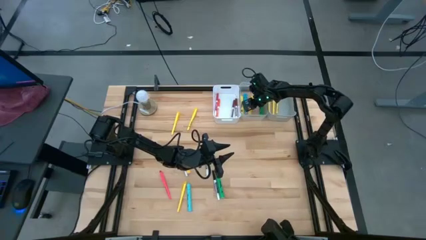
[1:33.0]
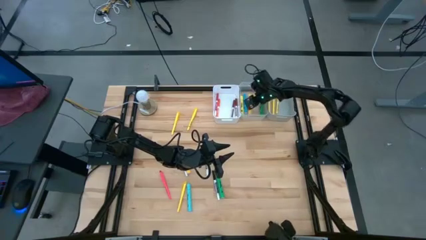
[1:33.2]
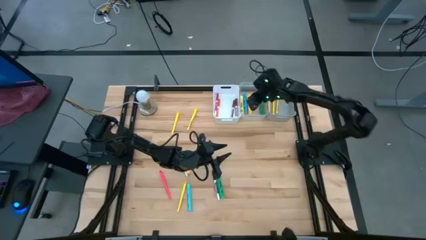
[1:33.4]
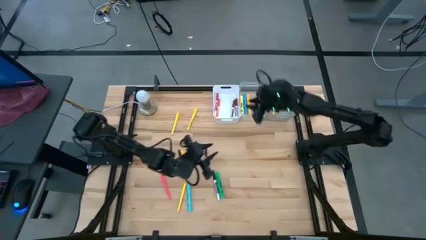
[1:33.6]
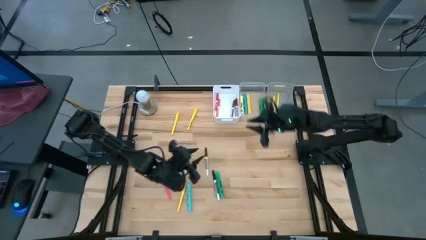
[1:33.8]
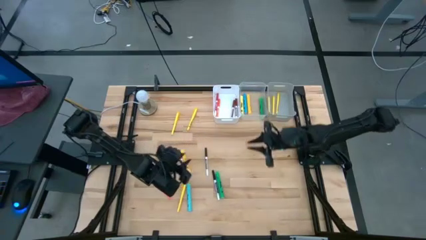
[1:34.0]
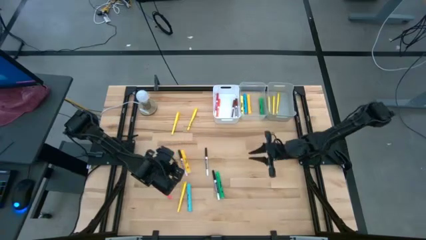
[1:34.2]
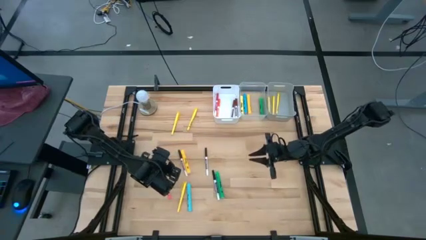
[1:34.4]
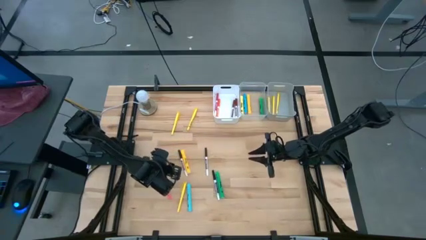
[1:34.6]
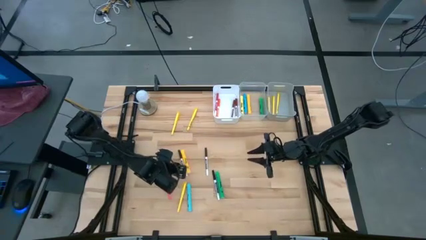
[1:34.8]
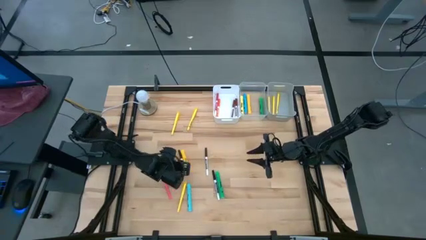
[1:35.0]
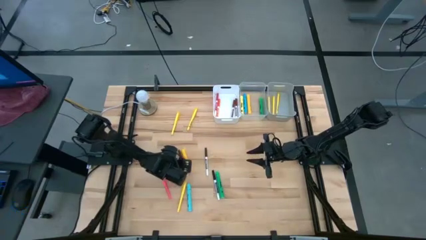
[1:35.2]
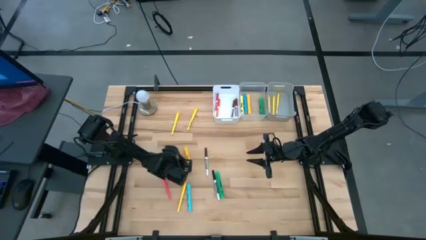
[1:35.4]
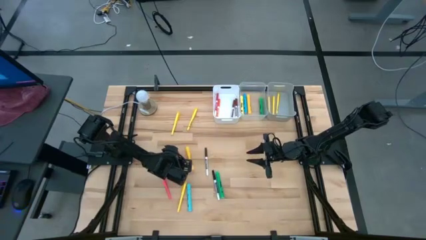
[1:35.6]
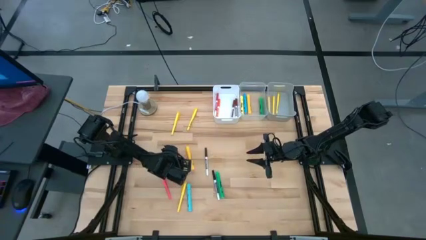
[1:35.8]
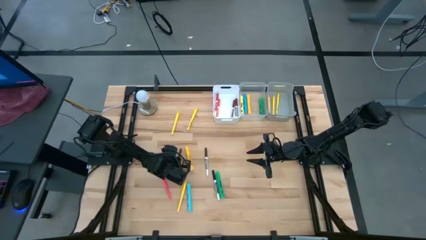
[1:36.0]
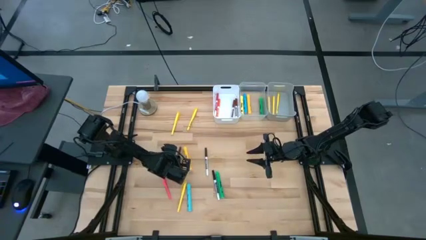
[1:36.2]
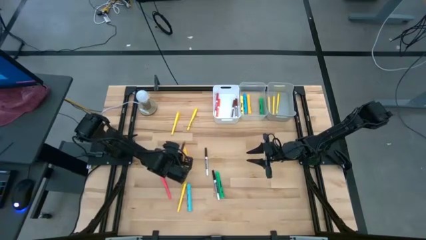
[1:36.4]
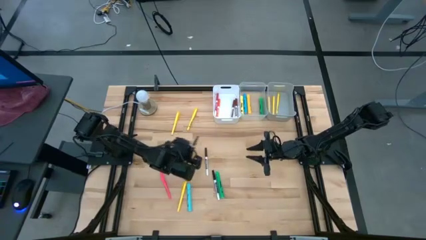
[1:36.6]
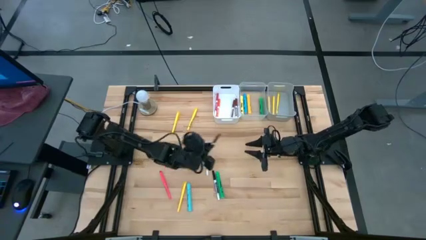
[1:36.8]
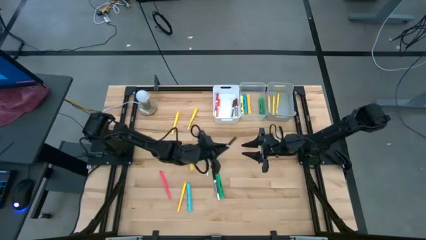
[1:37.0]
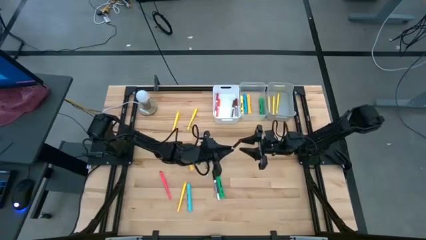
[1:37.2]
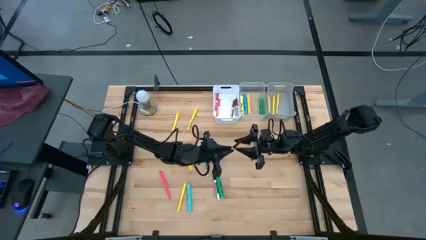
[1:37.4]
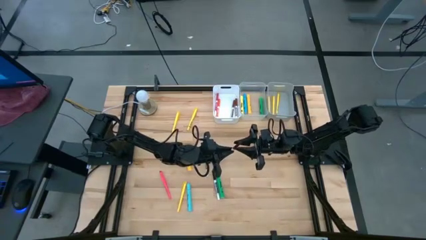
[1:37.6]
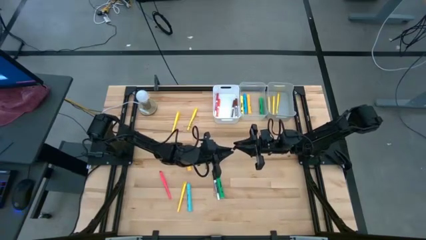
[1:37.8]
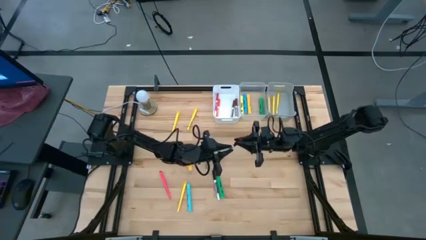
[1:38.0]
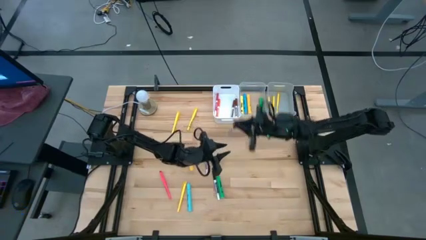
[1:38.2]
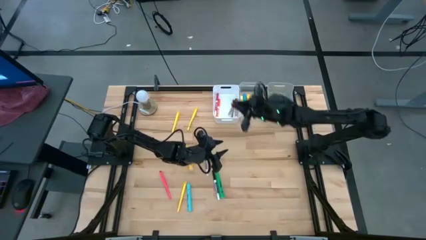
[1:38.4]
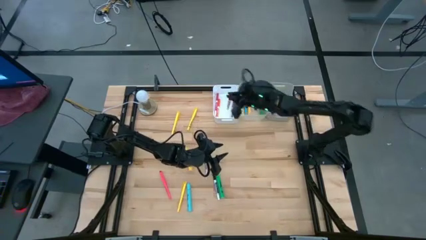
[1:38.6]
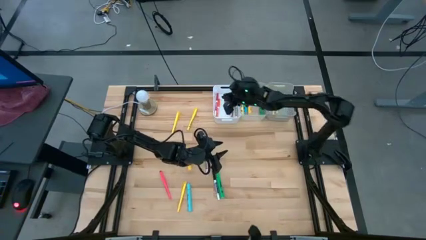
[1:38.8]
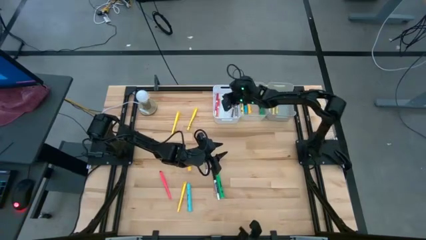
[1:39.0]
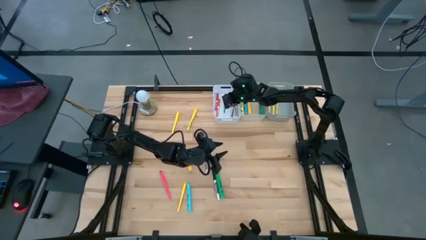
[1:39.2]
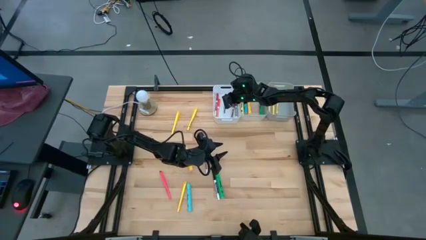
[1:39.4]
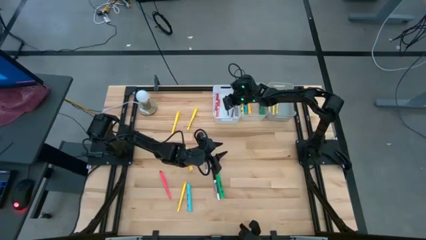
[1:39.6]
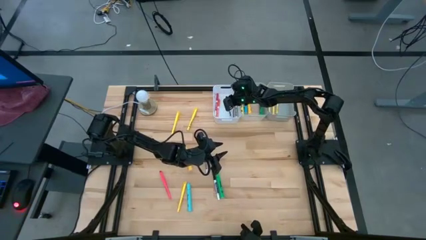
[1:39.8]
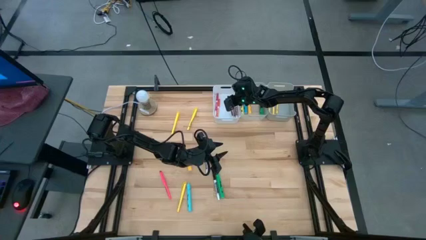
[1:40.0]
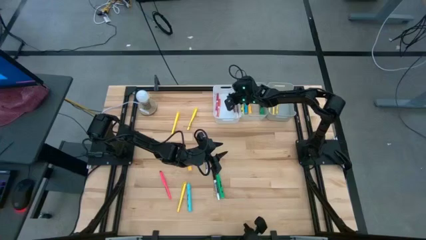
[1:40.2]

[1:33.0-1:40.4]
Task: Pick & Place Markers
Put the left brown marker pen into the white bin

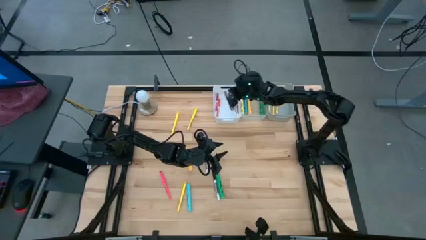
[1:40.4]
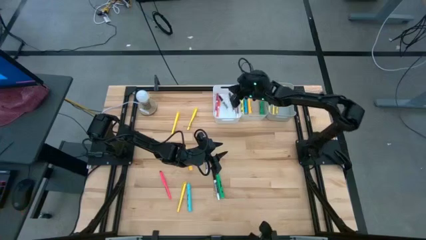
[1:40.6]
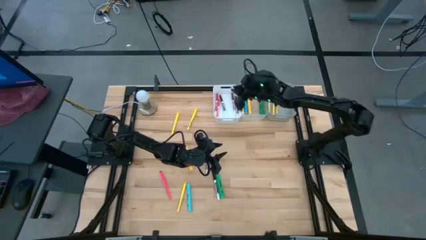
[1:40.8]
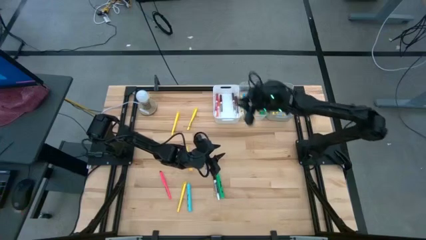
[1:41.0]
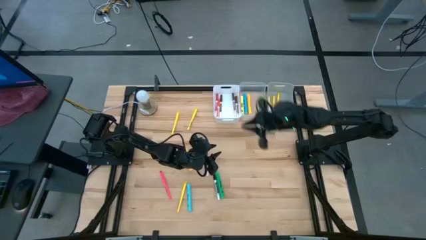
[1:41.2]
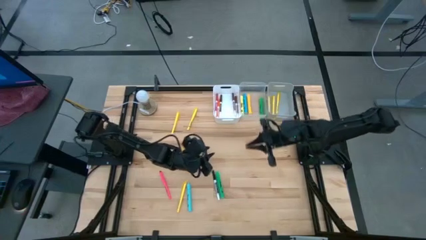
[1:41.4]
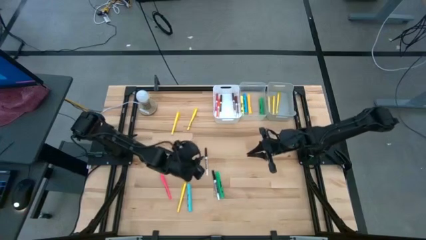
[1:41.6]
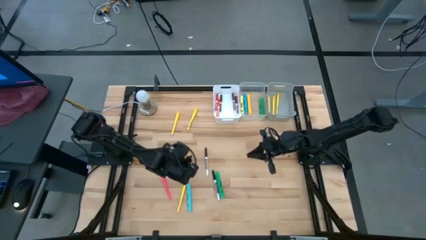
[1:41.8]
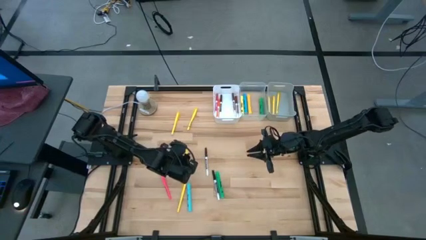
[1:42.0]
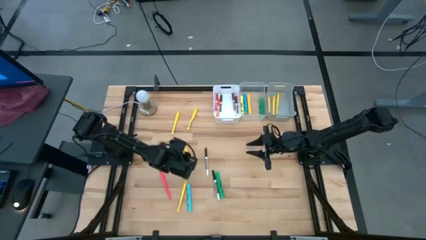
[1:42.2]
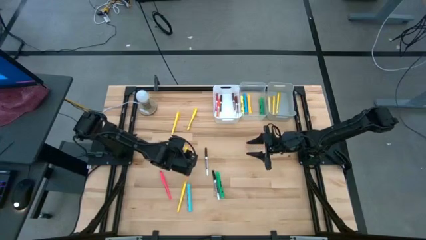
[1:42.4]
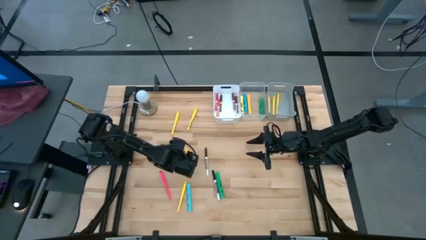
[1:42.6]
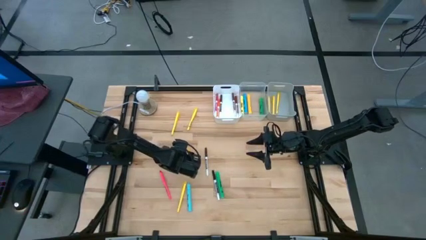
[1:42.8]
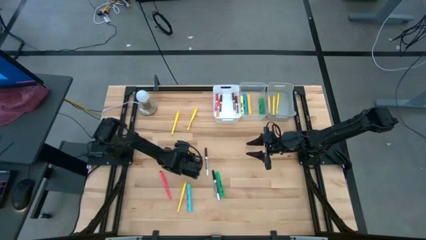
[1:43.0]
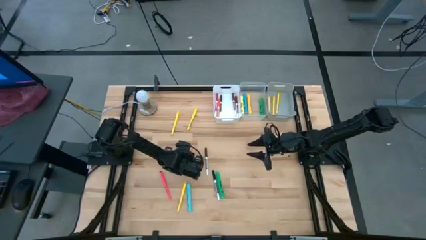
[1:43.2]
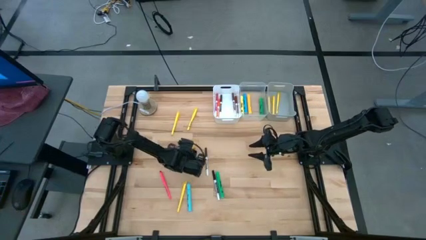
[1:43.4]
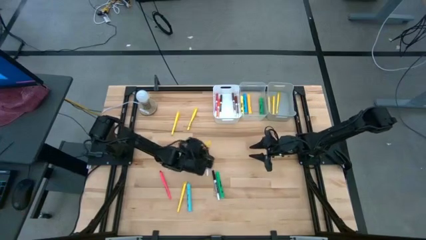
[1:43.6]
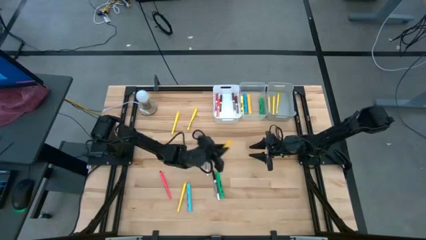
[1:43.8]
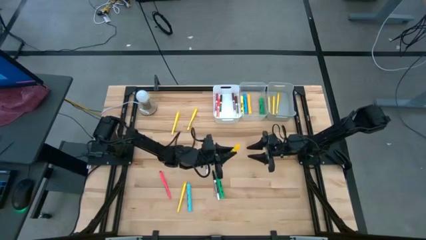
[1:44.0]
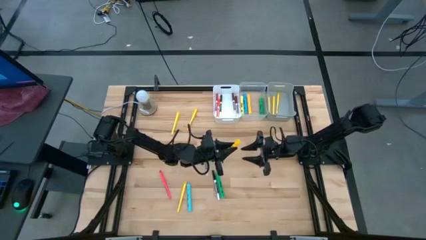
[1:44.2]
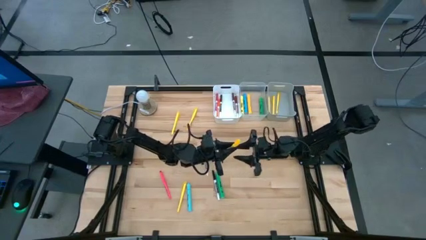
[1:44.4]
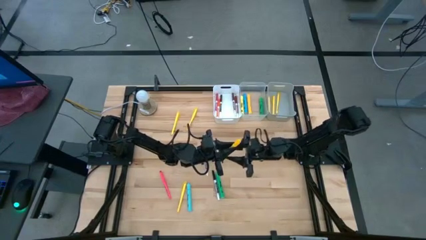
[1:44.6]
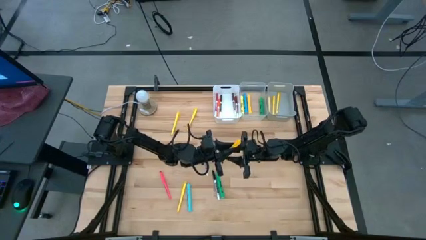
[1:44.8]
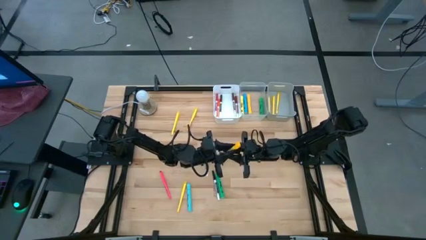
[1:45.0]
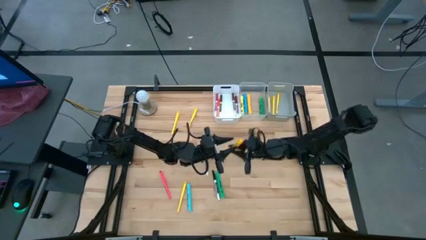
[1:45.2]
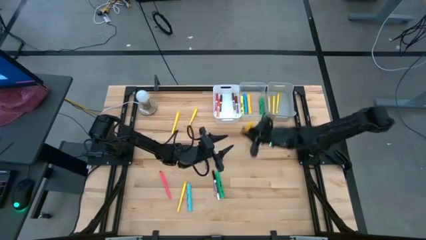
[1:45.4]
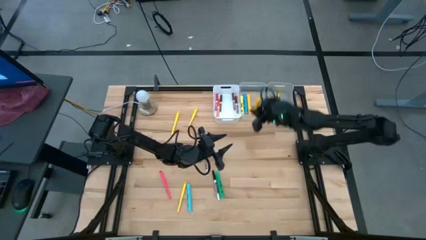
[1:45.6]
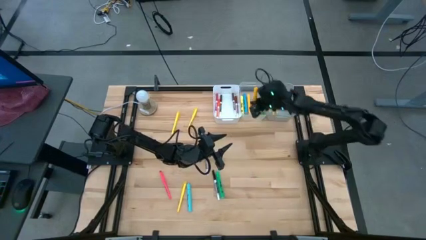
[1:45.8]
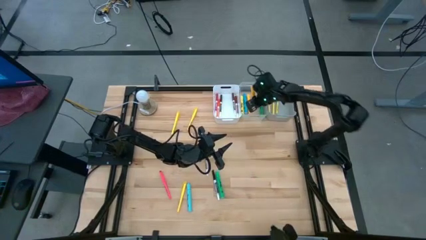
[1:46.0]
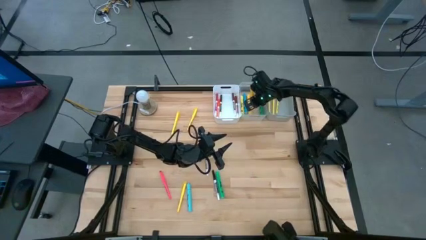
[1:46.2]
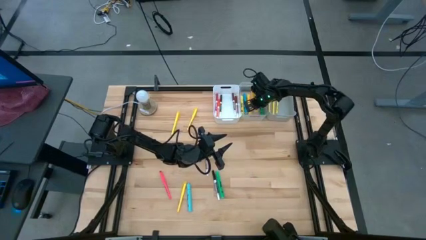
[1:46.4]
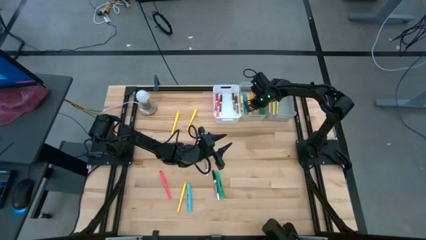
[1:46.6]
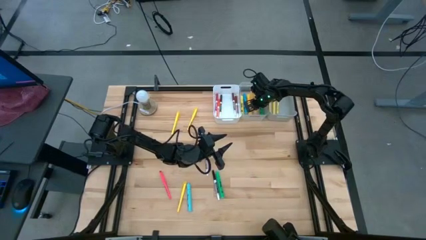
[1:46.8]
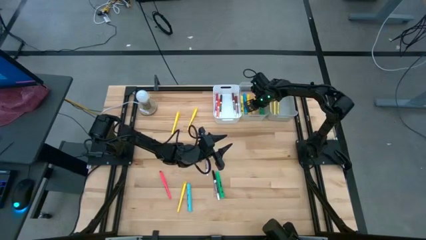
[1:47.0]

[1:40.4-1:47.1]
Put the yellow highlighter pen into the transparent bin

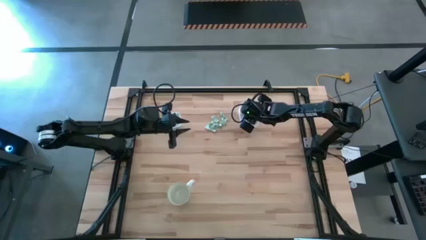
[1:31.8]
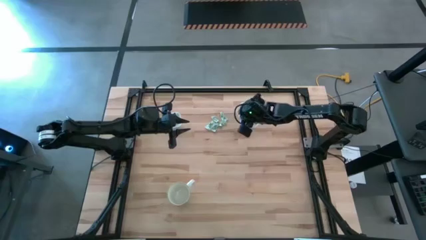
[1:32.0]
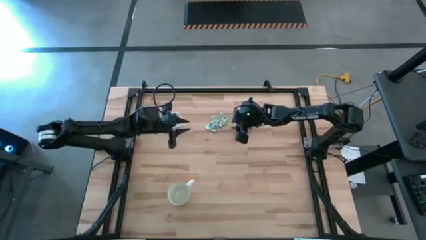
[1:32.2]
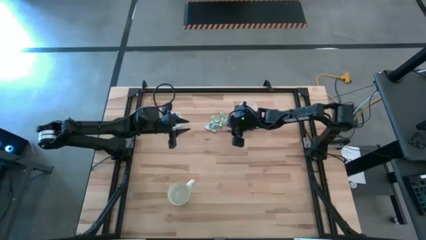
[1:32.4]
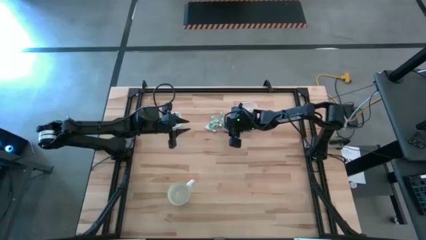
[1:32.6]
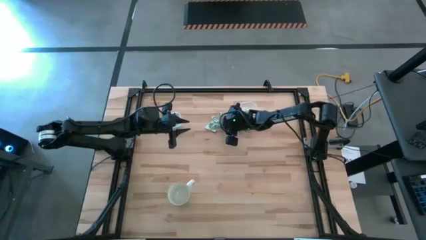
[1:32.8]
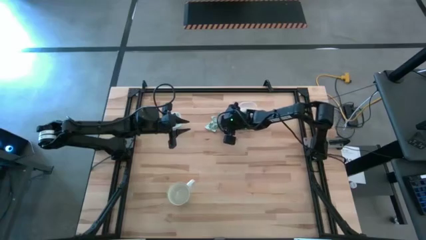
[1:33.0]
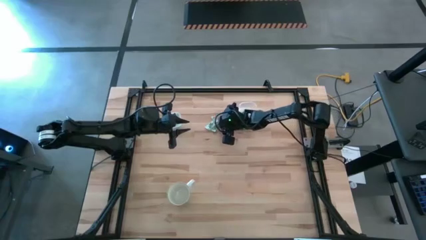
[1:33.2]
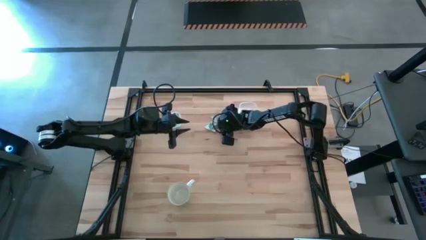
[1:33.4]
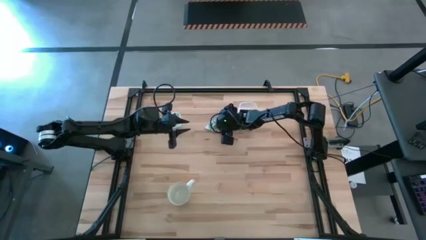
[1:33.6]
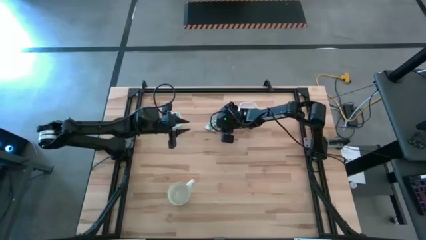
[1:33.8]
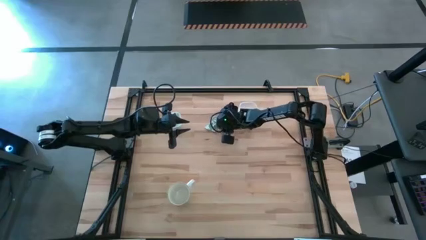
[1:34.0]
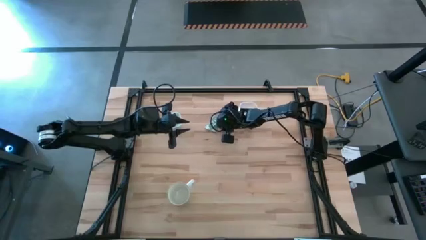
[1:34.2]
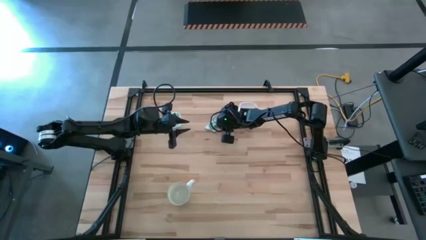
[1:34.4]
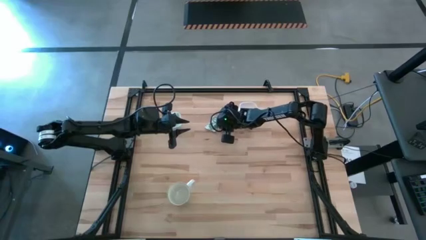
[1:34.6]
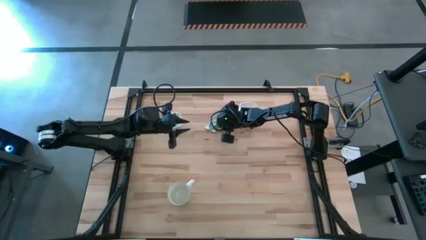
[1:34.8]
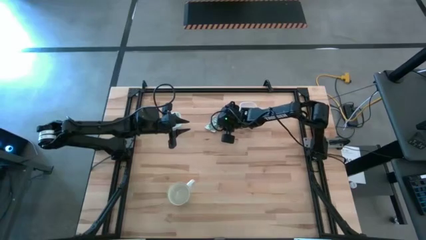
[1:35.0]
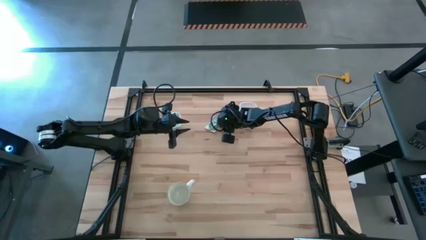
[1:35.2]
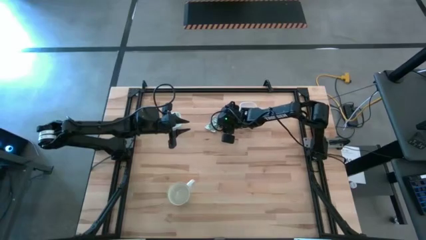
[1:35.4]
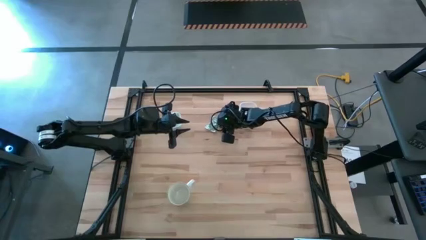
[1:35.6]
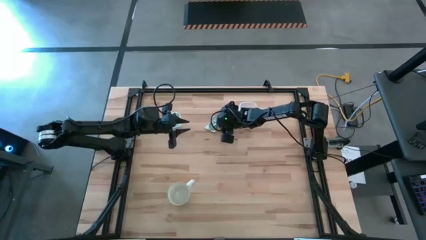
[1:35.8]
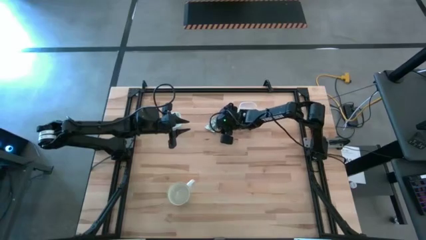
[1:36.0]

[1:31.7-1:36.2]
Task: Pick and place items into bin
Put the green stevia packet into the rectangular transparent bin
